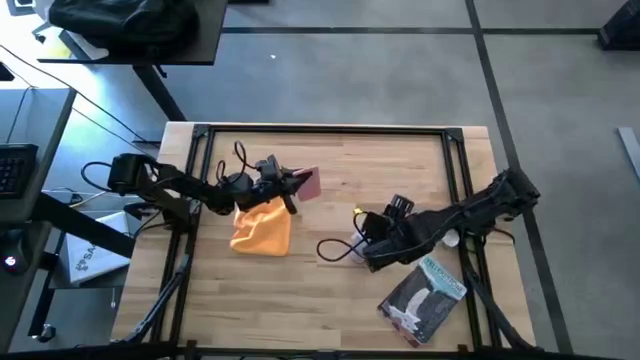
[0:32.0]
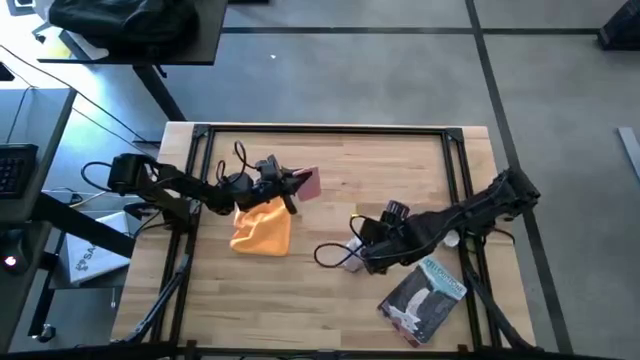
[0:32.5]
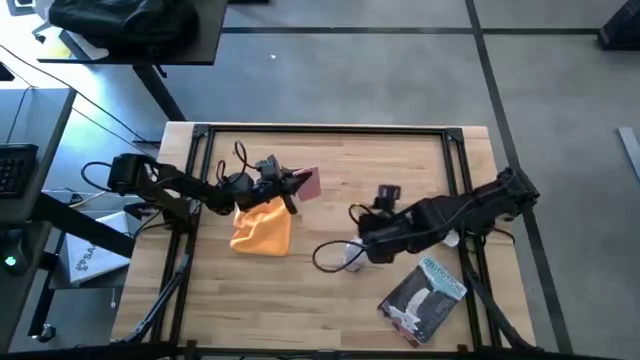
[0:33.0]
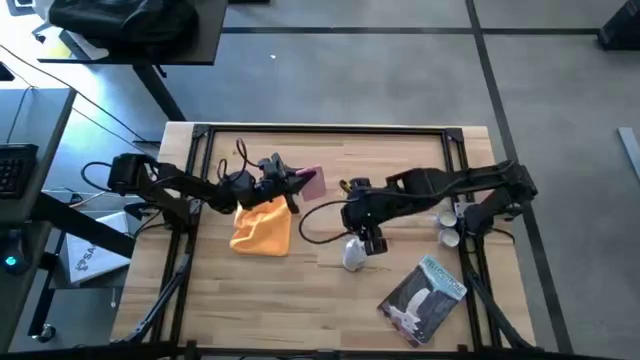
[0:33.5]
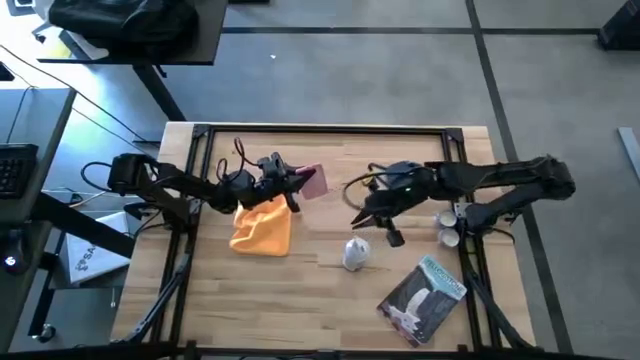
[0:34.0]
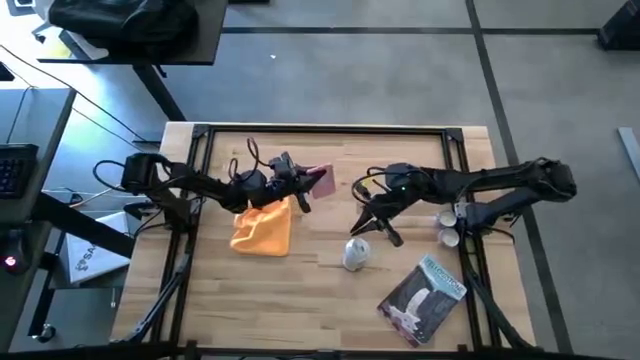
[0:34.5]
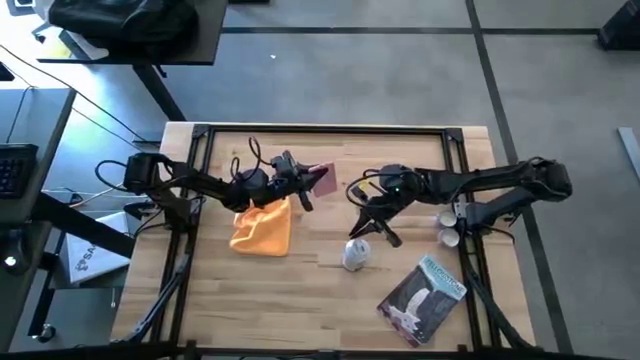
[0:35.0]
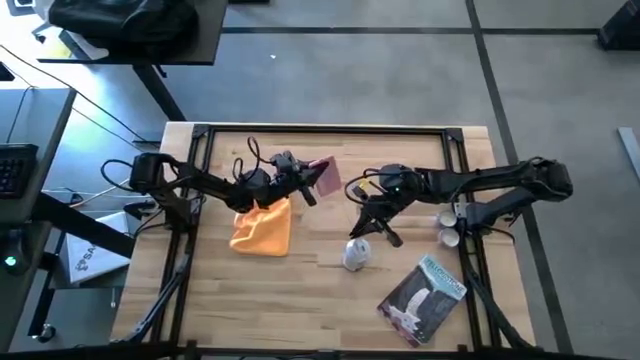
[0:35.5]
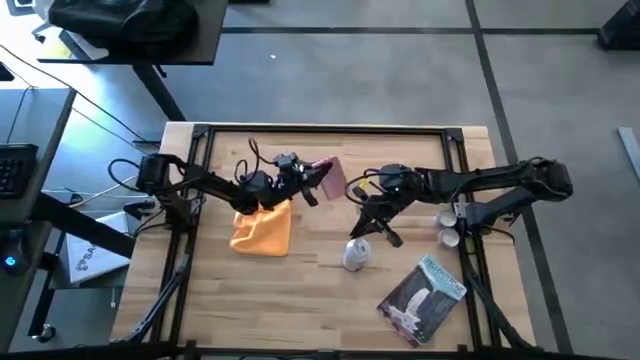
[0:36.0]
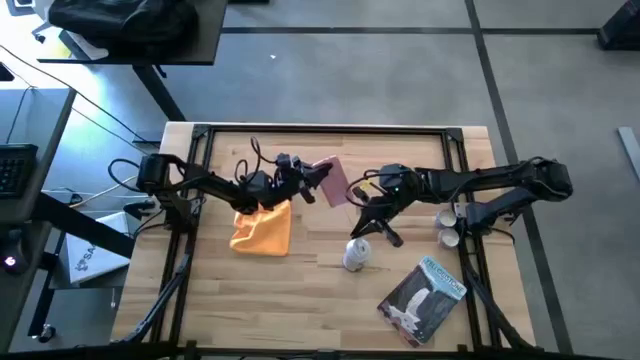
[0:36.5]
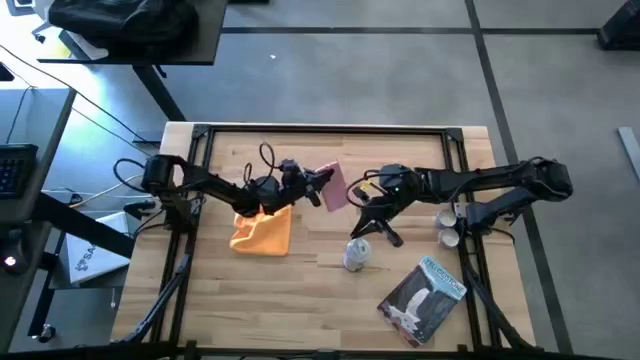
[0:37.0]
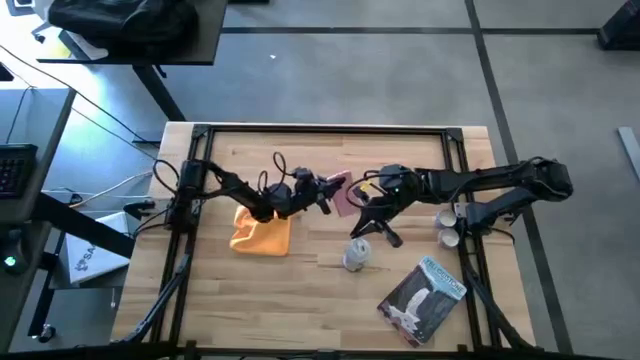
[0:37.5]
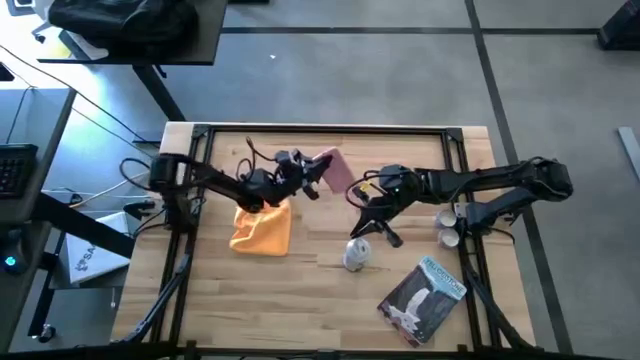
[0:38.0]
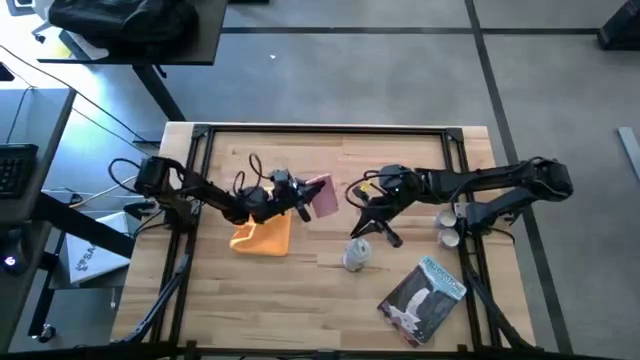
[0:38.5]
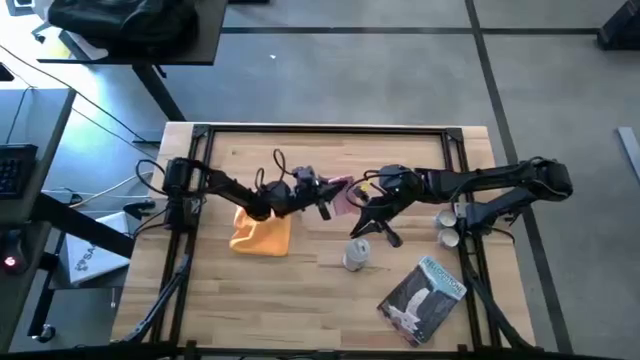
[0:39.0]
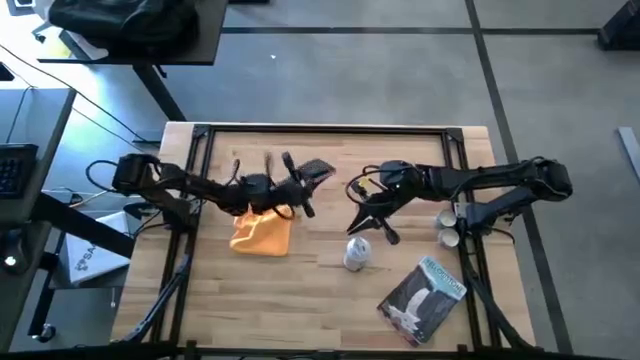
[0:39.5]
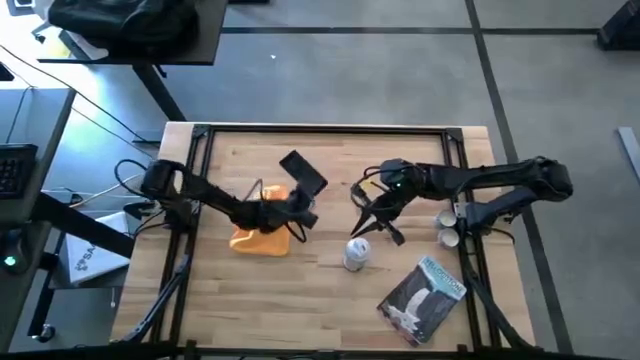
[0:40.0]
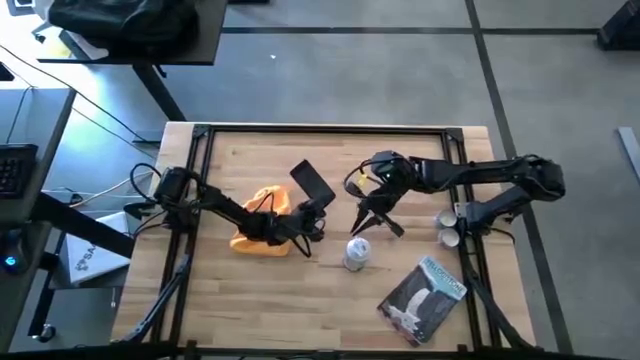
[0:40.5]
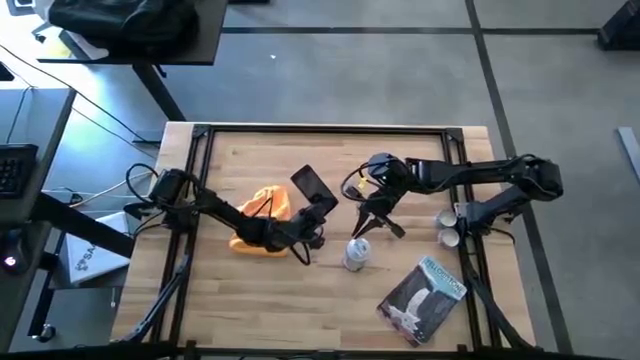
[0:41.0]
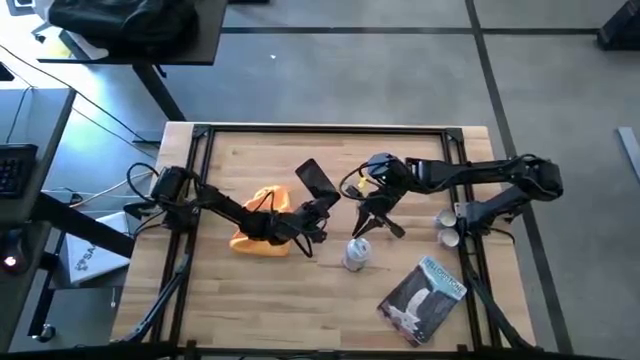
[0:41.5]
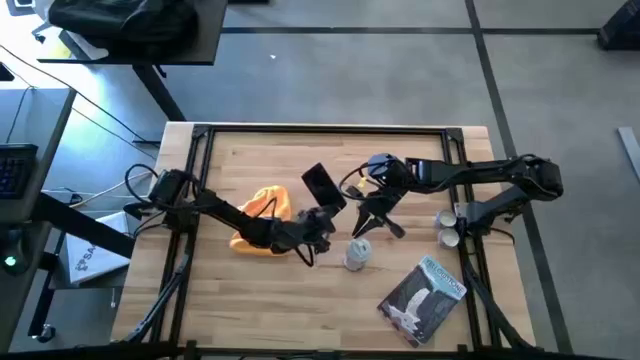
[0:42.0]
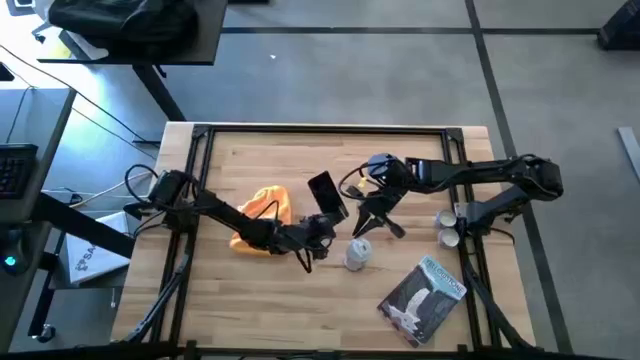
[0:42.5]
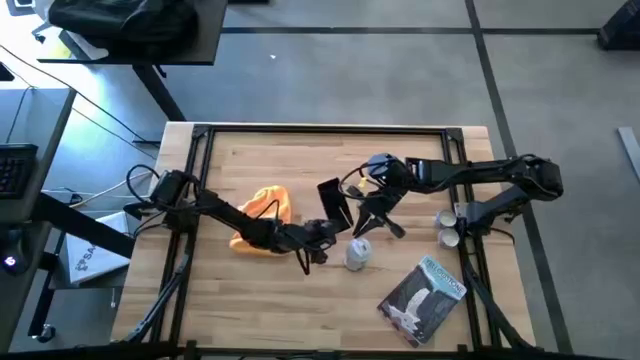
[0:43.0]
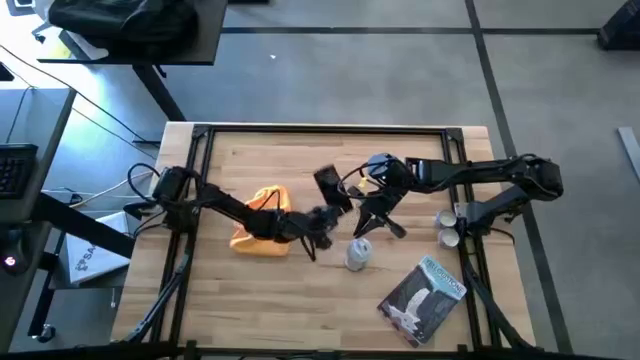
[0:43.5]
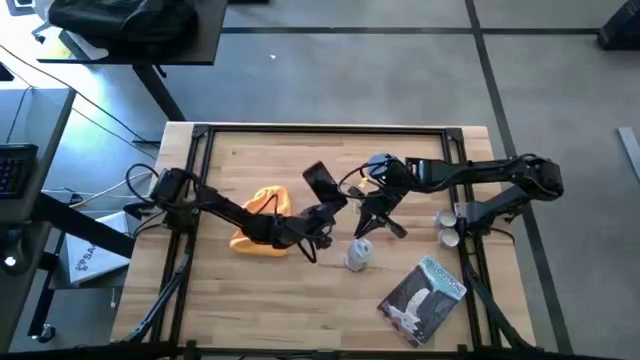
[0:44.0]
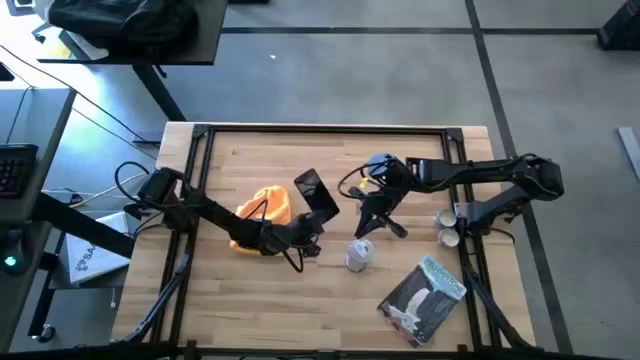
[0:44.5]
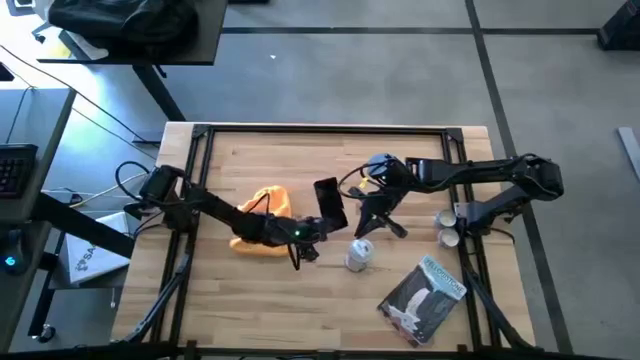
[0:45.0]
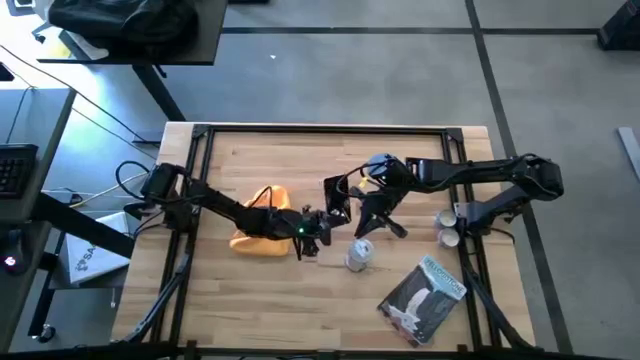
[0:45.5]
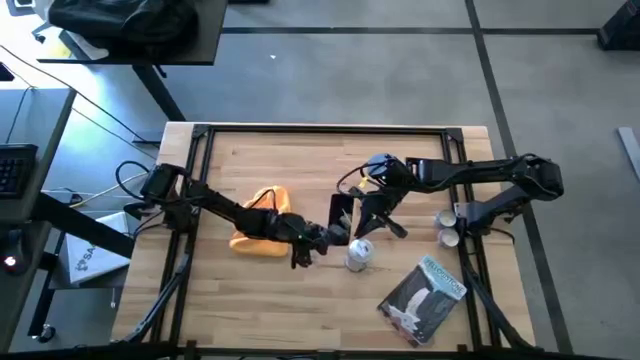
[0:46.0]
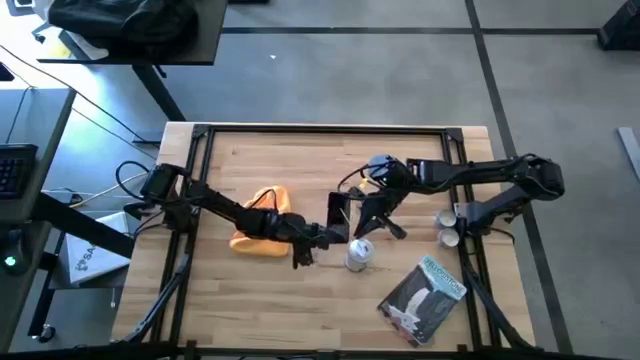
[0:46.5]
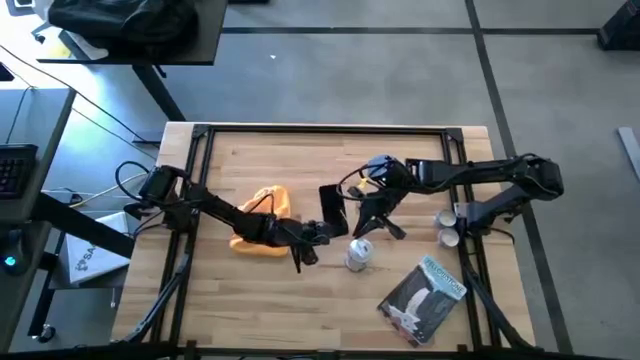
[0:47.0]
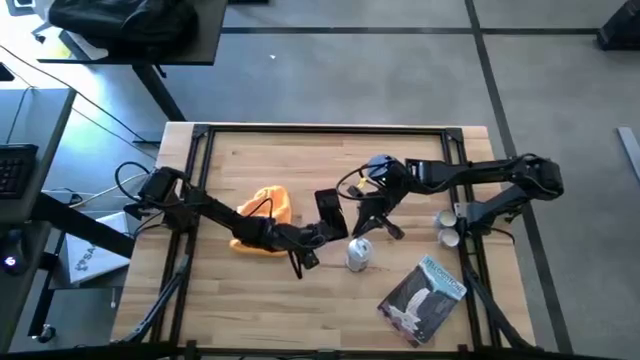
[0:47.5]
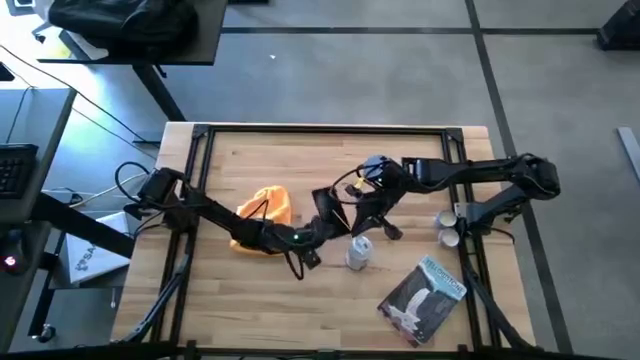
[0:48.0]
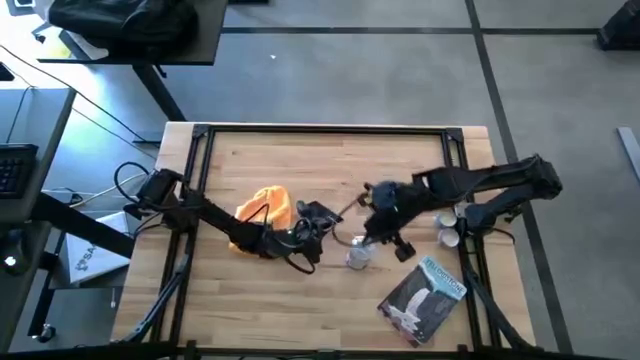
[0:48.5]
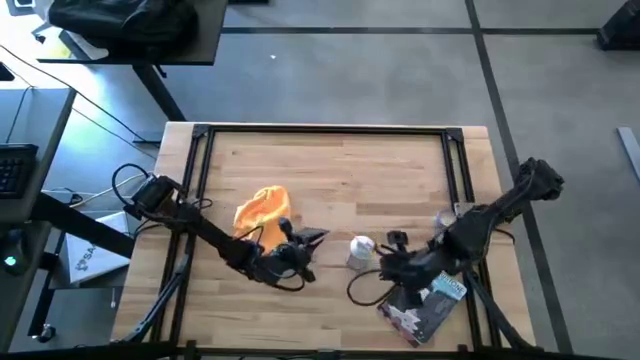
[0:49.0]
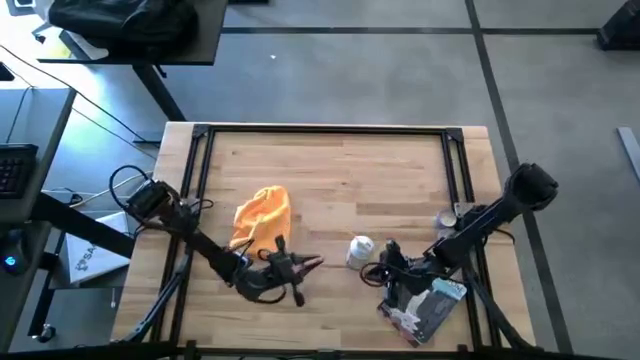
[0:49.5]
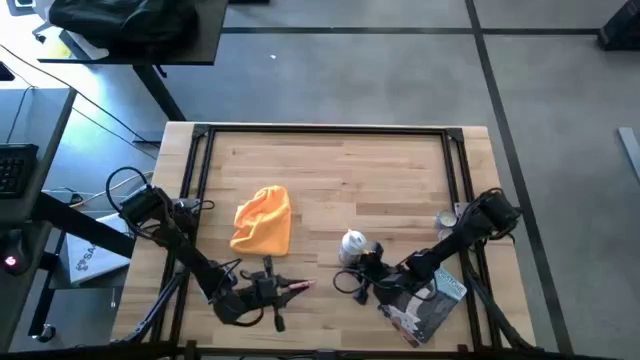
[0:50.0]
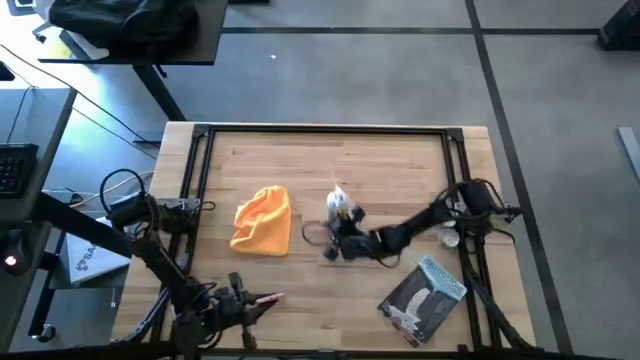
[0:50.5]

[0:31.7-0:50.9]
Task: Apply microfiber cloth
Spray the pink cellphone with the spray bottle

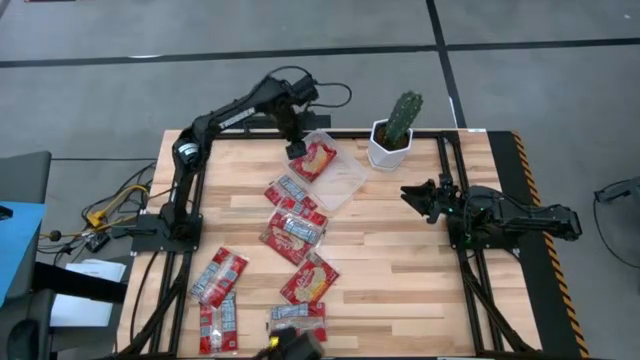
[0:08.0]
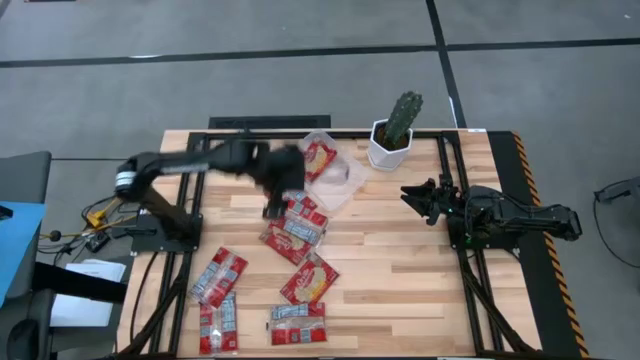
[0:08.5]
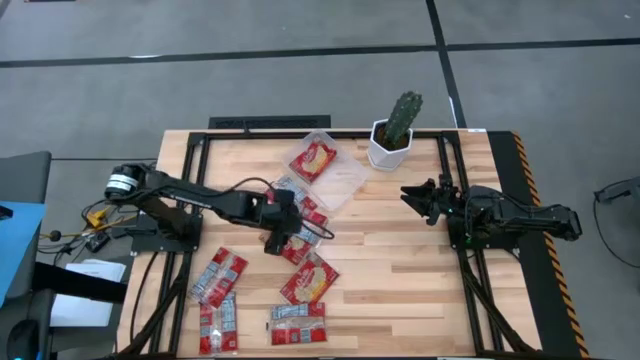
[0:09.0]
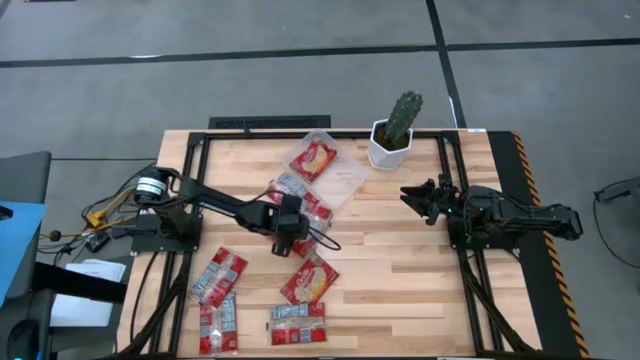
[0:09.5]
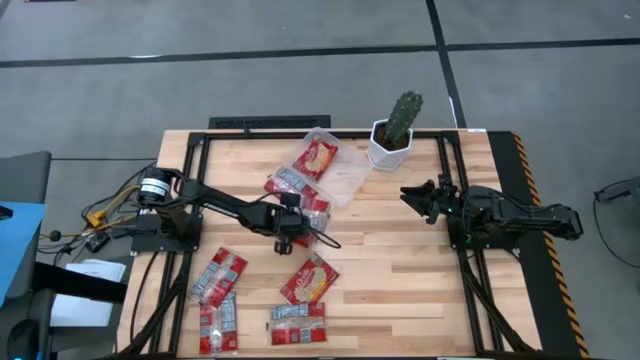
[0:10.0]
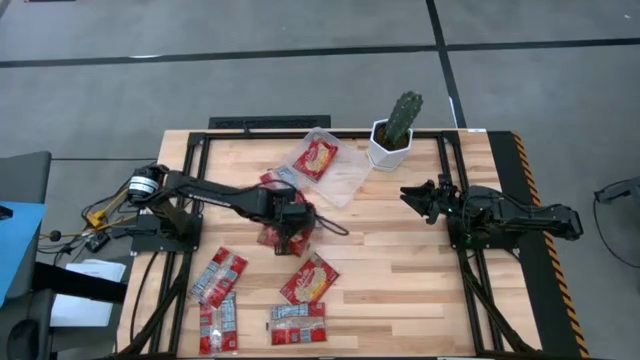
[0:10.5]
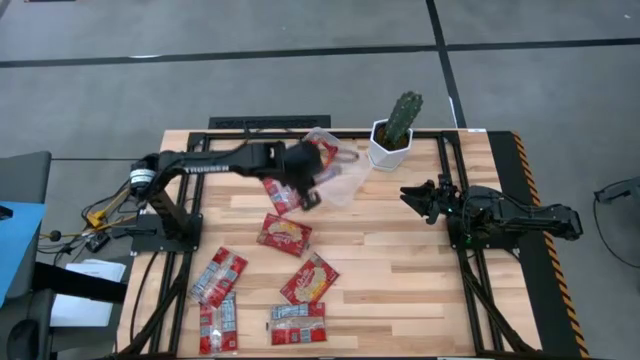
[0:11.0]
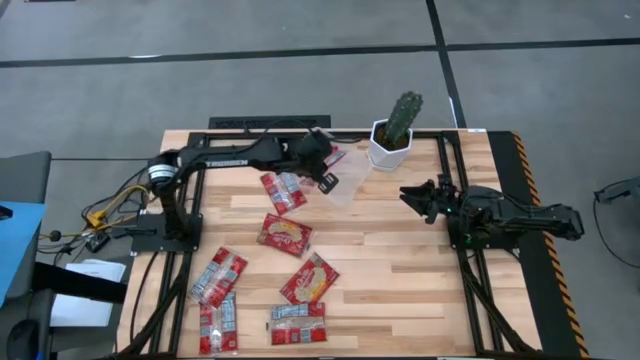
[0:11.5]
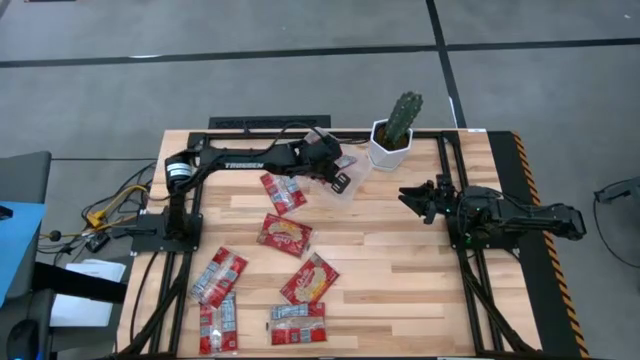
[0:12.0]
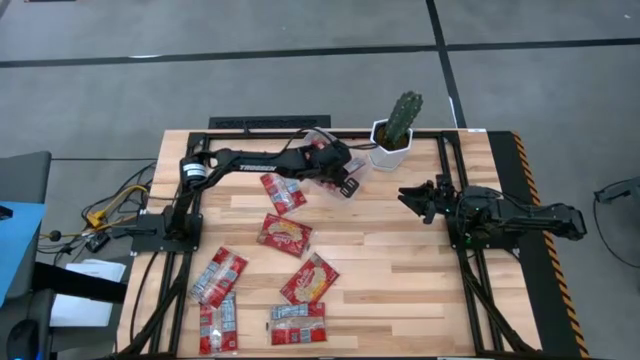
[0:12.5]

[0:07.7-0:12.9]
Task: Sort popcorn bags into baskets
Put the red popcorn bag into the transparent bin
